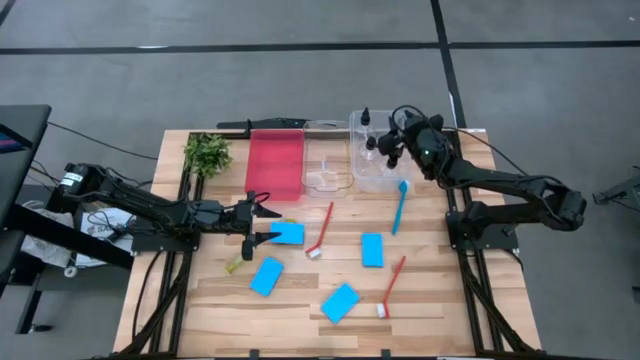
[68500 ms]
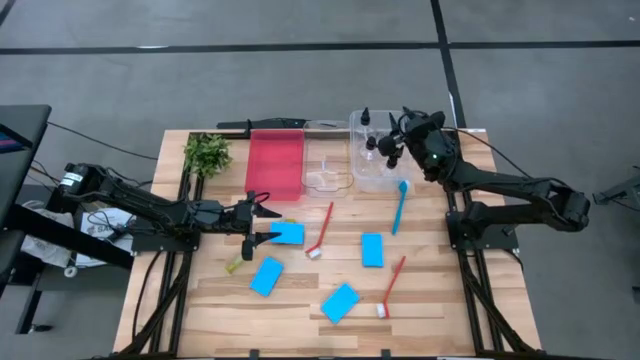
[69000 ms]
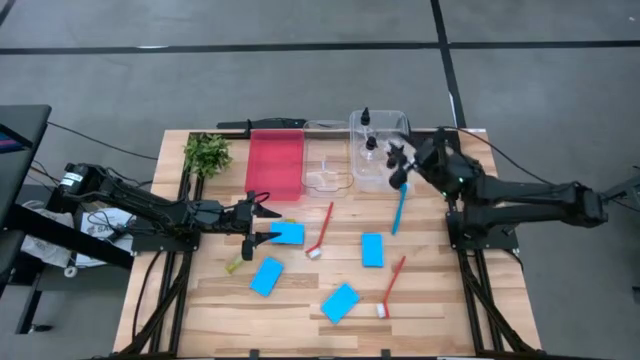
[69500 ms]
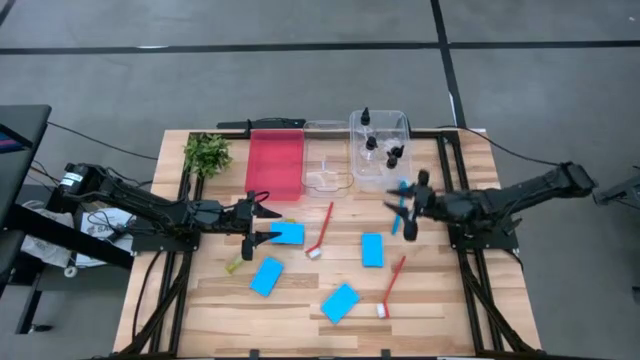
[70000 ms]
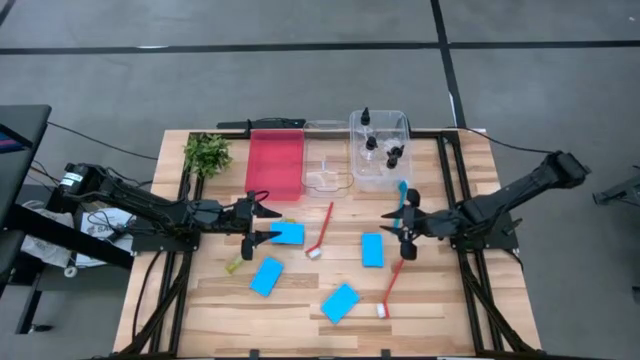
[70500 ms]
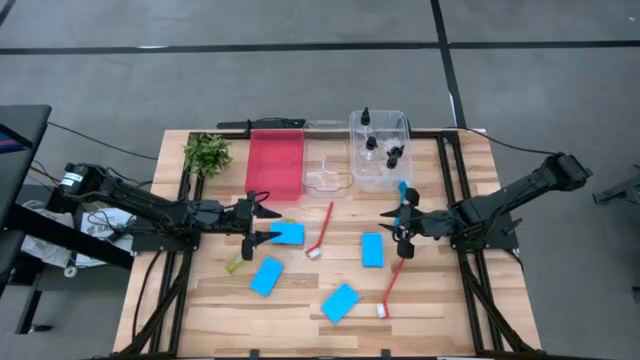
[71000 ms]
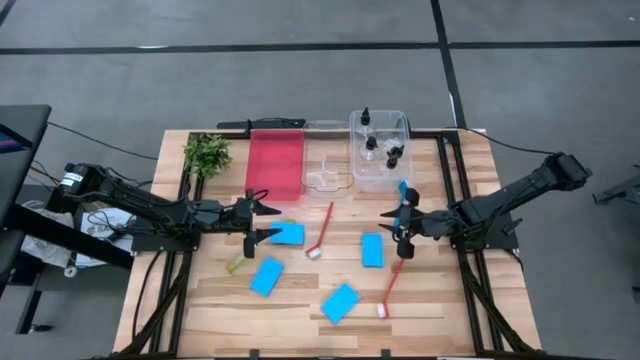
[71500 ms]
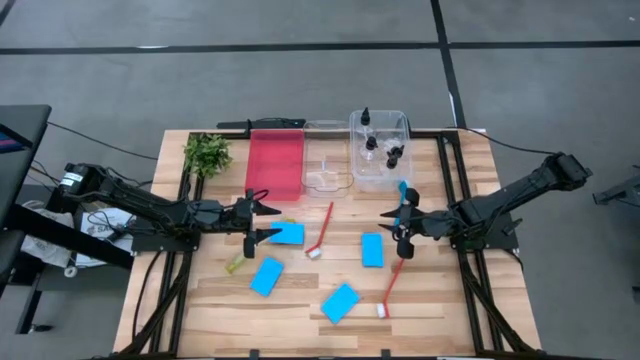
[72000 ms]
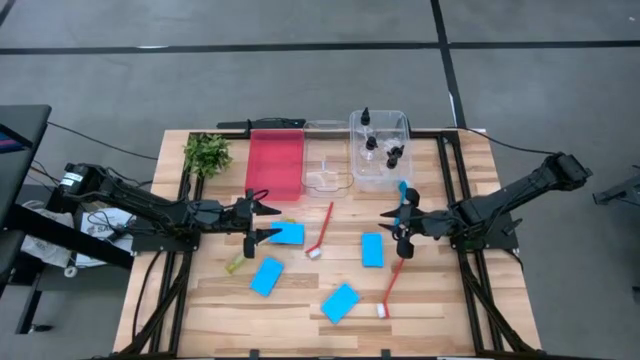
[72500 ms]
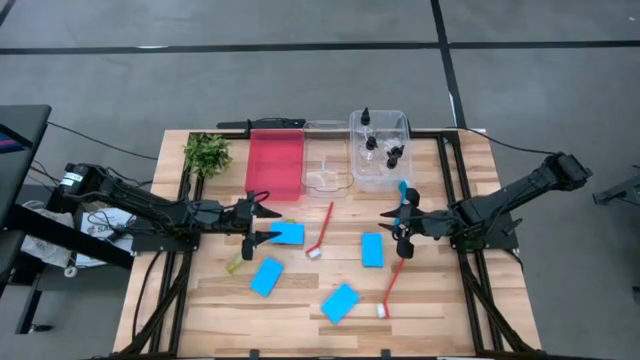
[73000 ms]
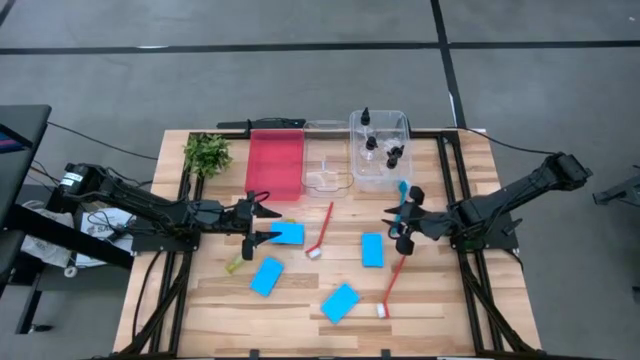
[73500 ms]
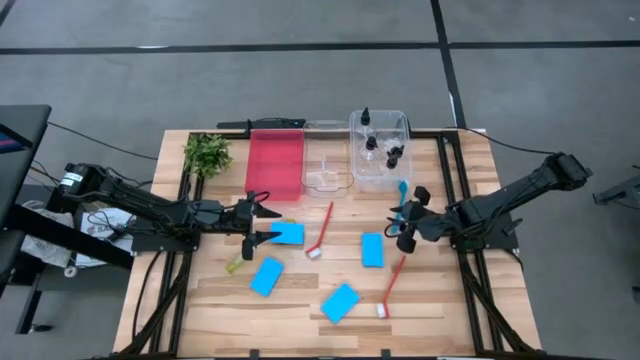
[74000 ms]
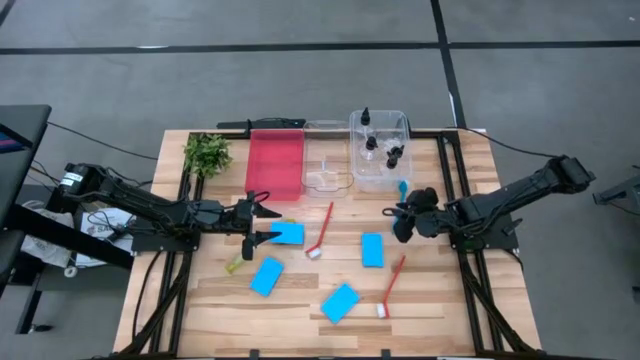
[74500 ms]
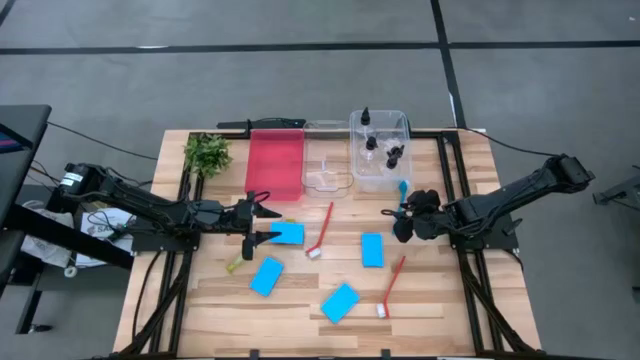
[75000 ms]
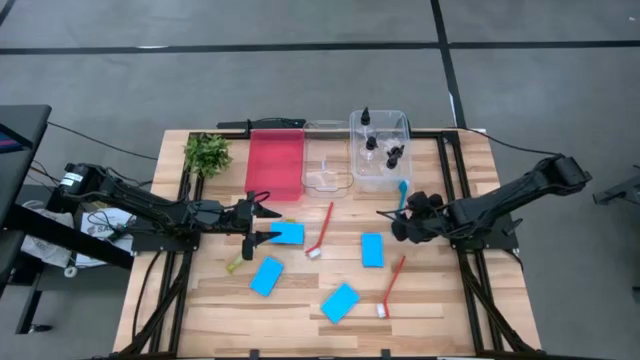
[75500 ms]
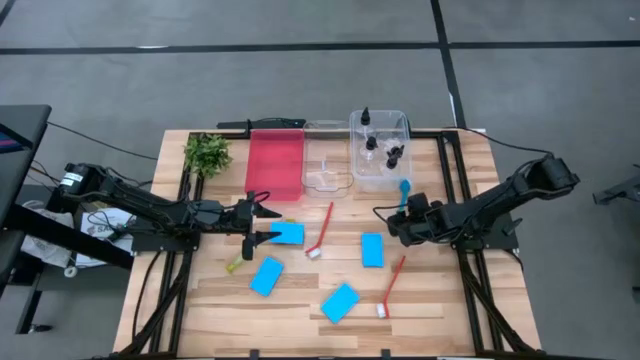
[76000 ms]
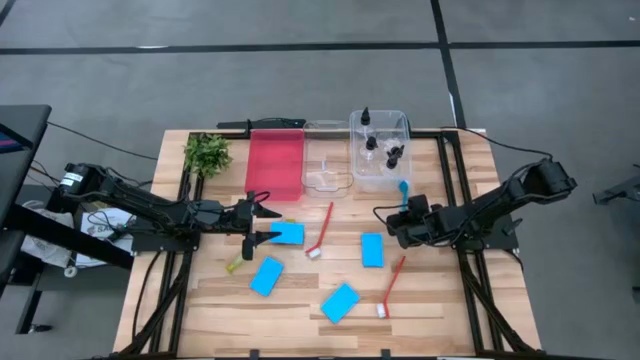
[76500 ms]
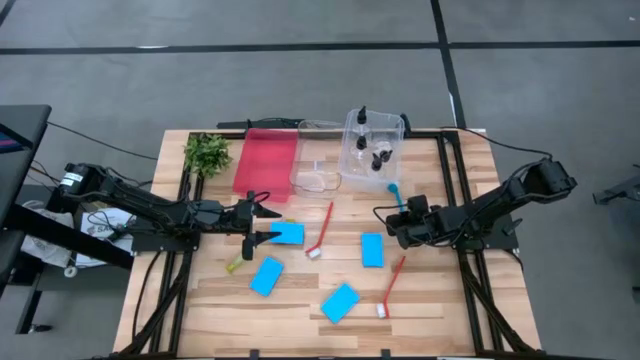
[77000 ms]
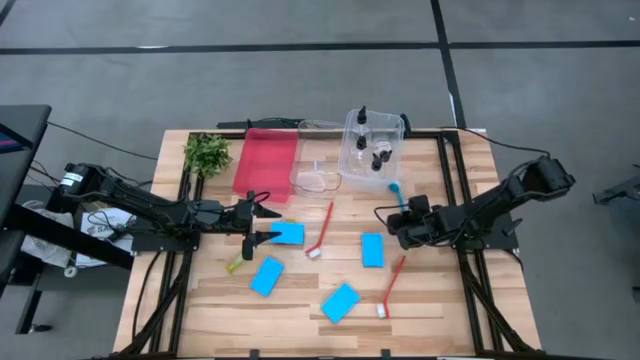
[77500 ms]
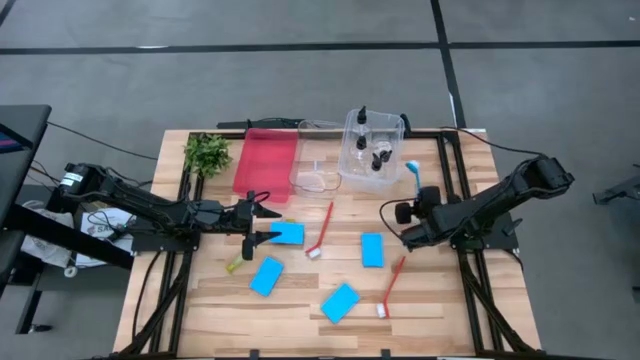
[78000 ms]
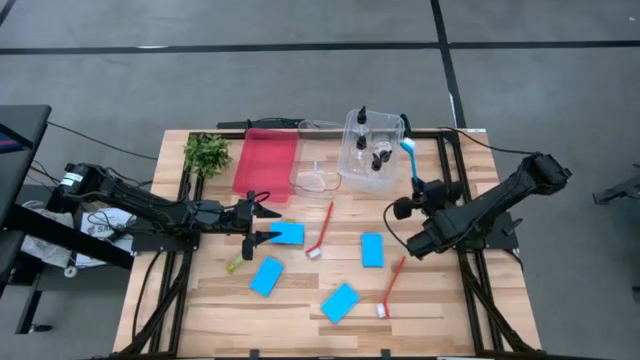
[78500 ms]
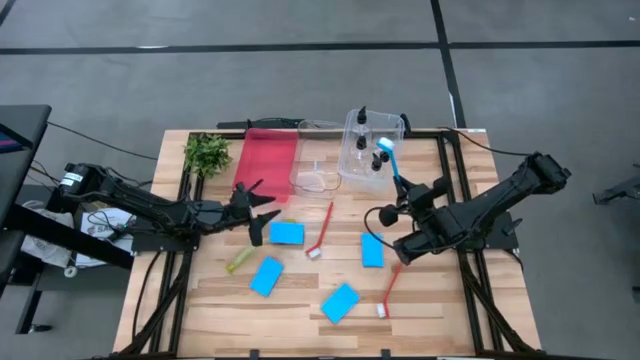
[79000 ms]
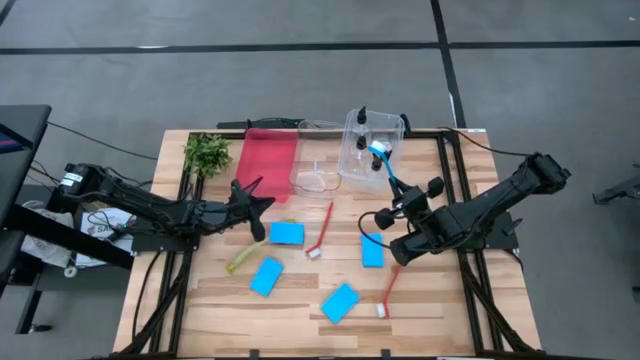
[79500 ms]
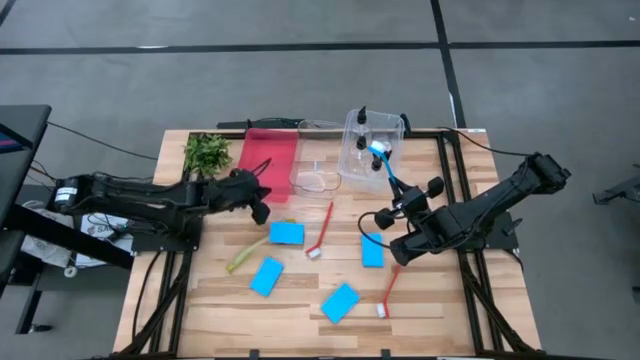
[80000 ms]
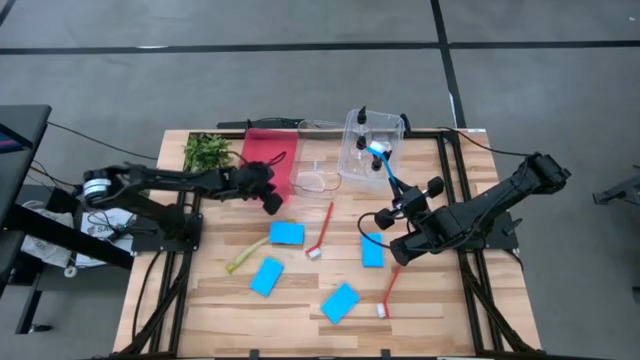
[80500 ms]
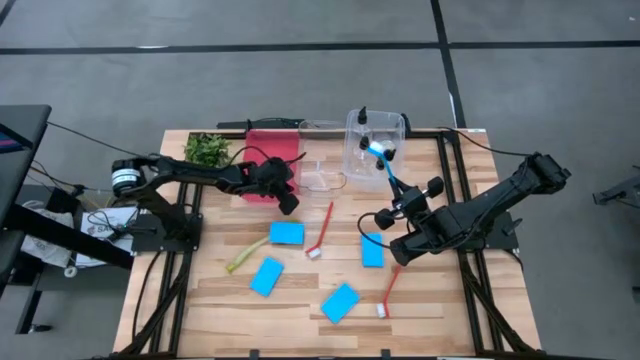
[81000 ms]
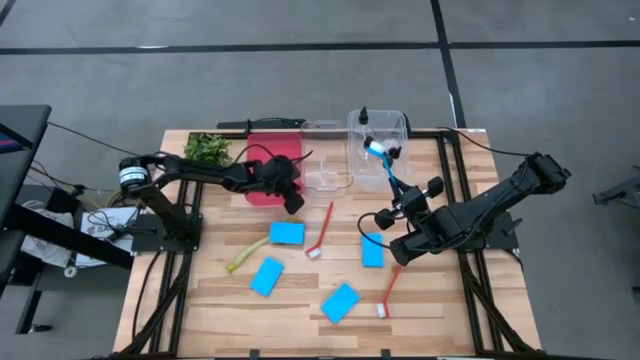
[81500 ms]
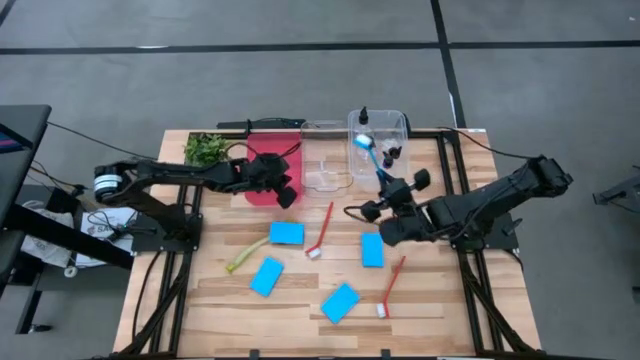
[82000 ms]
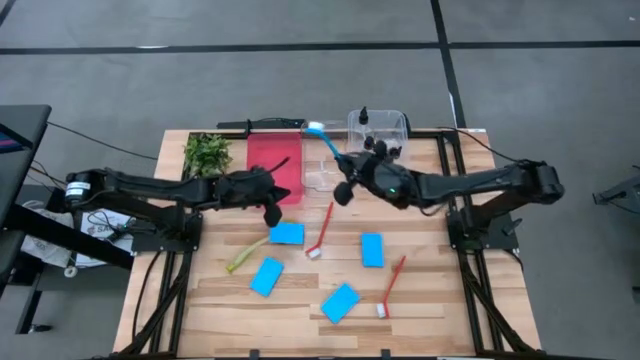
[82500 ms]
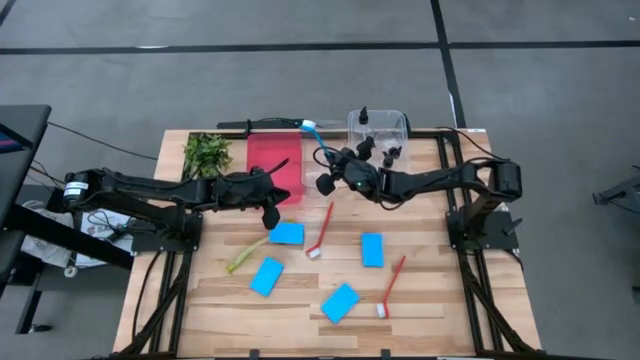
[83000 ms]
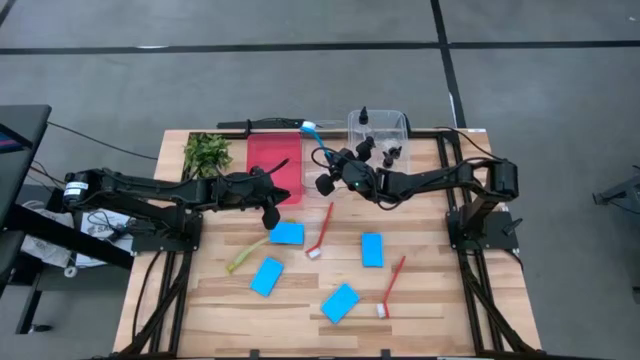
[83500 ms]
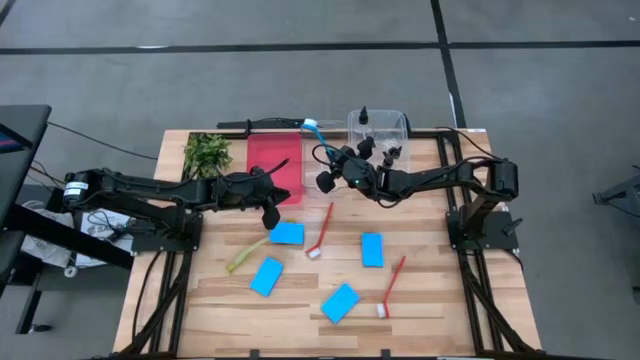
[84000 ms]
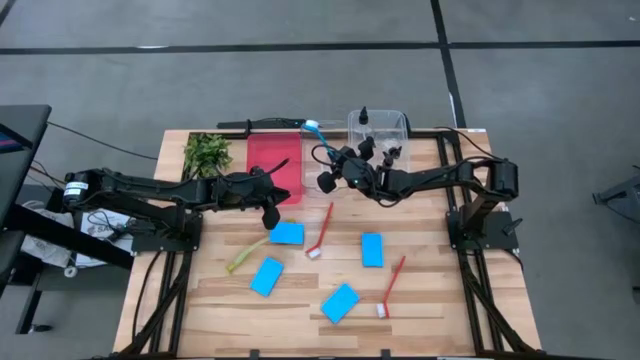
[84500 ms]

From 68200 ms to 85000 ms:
Task: Pick & Place Kitchen Sink Supplies
Put the blue dish brush into the left transparent bin

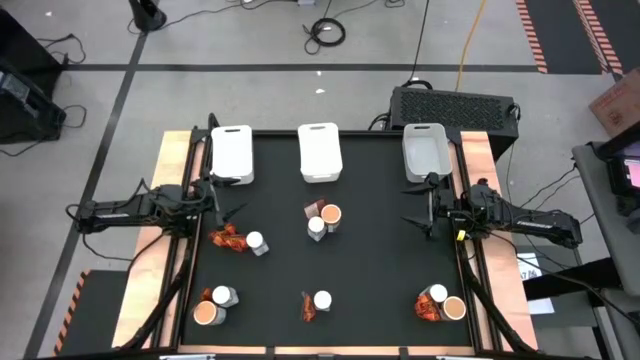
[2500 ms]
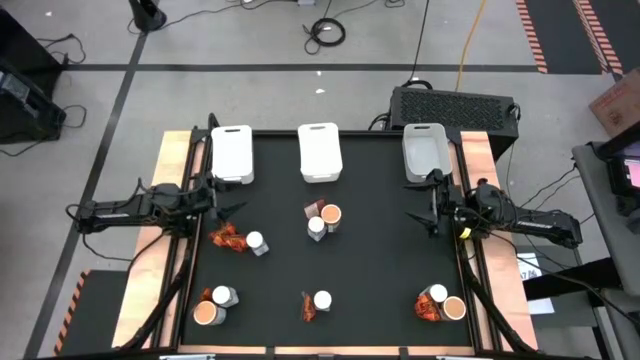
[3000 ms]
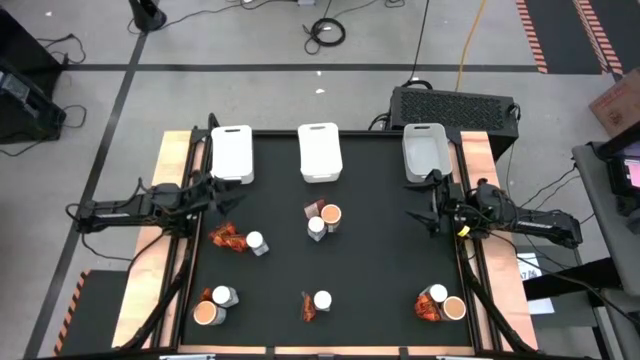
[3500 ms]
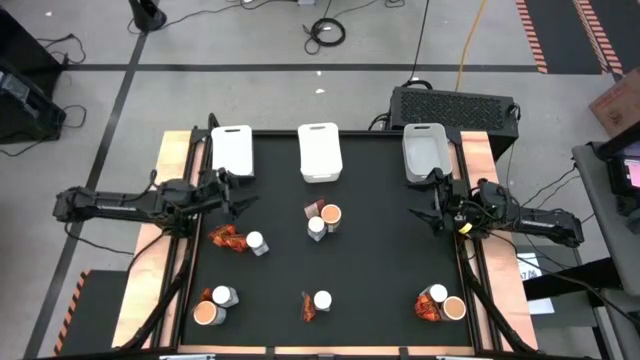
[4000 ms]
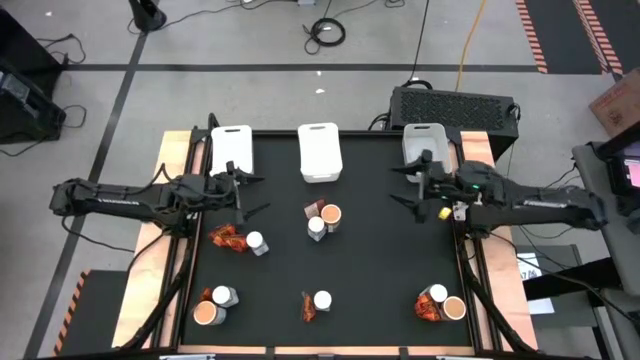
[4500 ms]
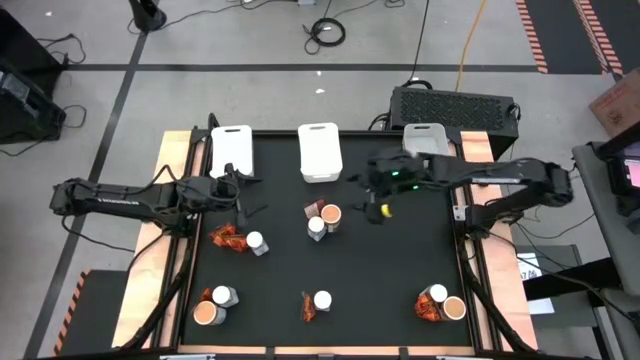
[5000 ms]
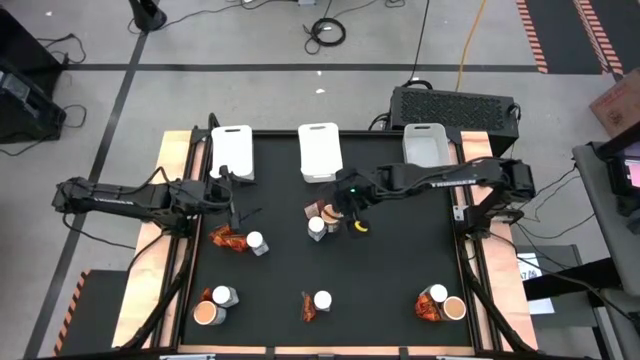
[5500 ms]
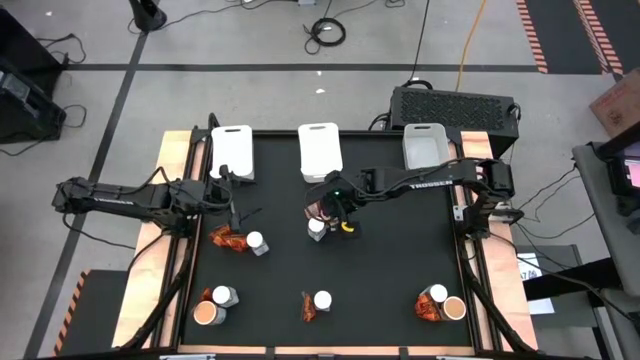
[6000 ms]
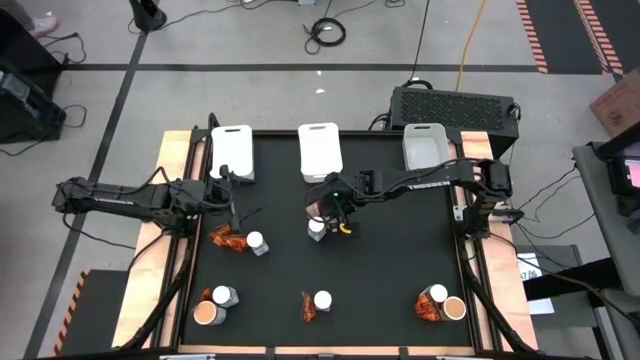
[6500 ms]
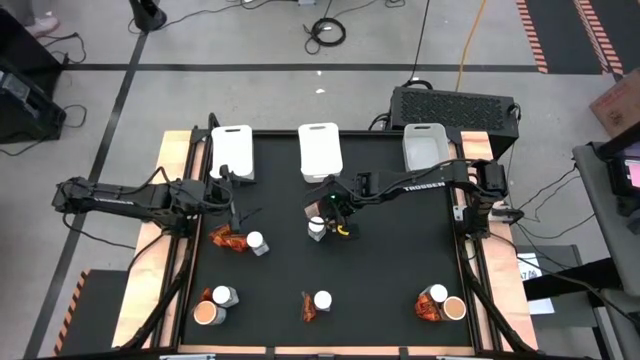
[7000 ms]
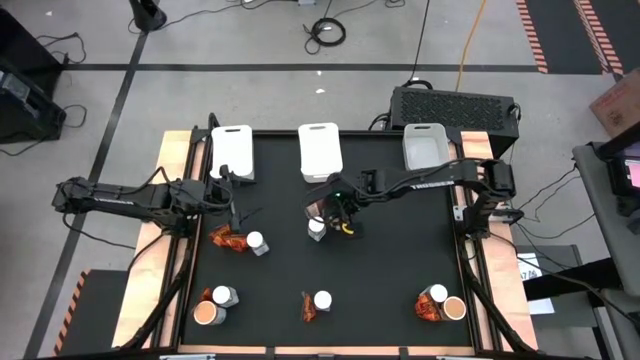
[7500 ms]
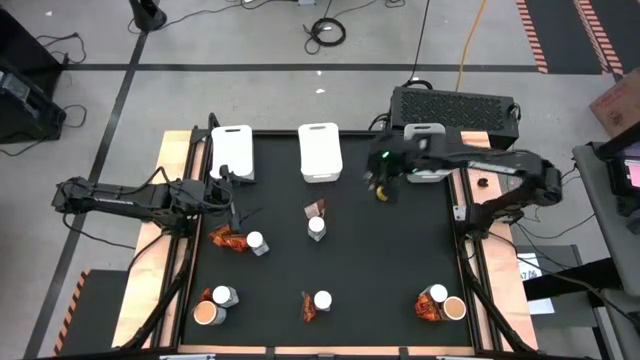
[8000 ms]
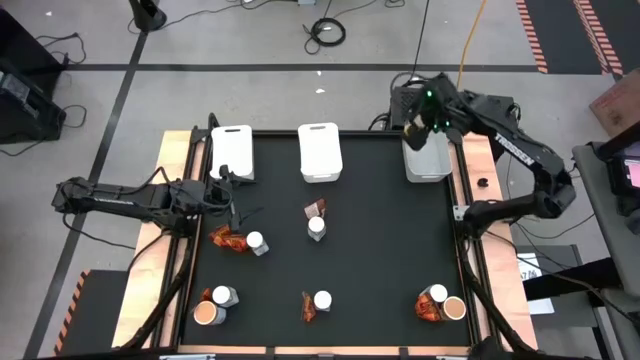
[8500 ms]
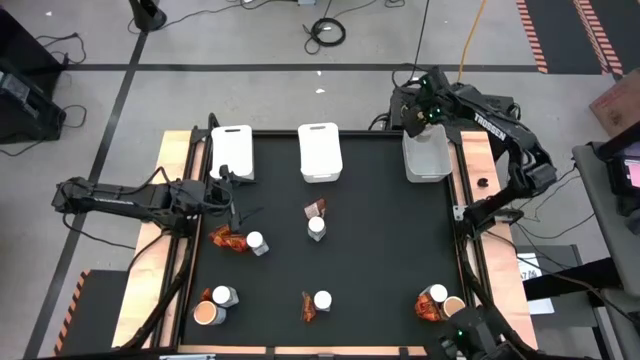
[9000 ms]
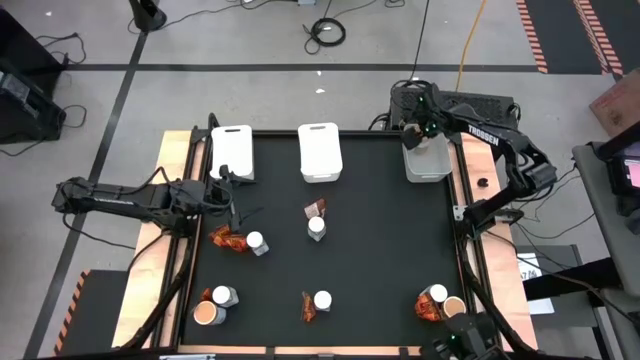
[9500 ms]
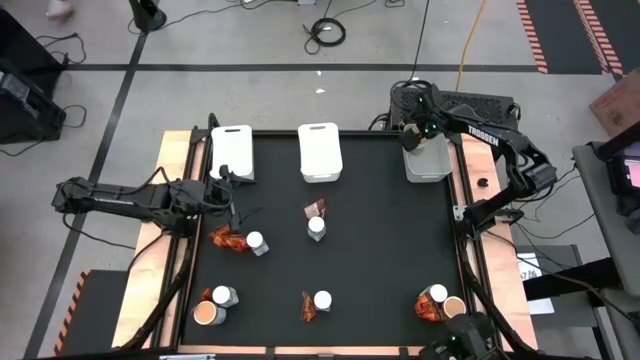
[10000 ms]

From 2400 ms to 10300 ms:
Task: Sort spices by type
Put the gold seasoning bottle into the gray bin
